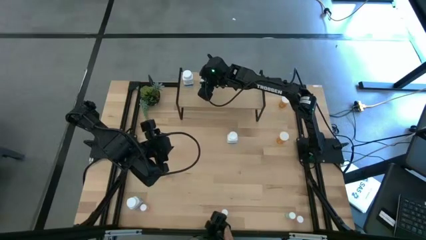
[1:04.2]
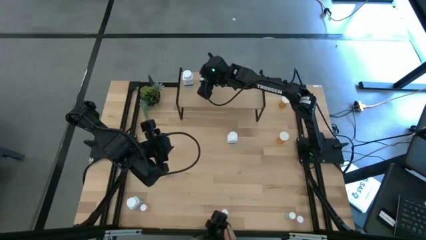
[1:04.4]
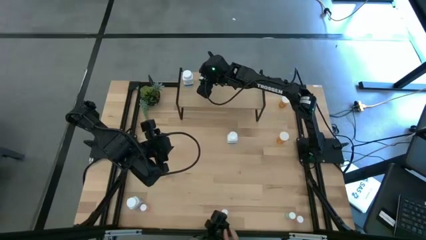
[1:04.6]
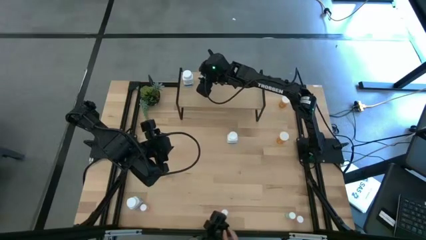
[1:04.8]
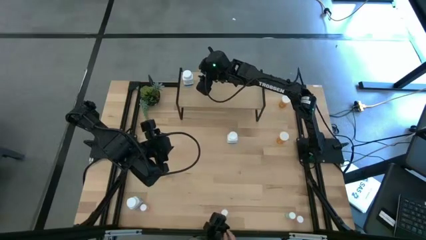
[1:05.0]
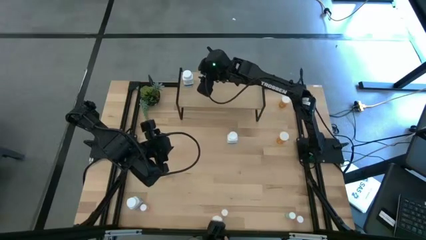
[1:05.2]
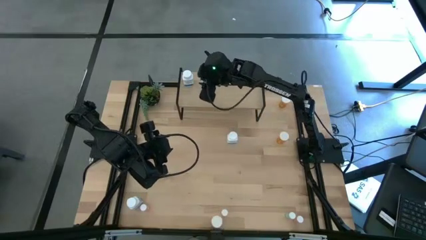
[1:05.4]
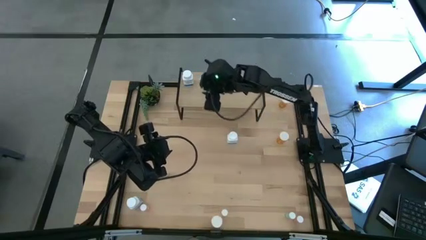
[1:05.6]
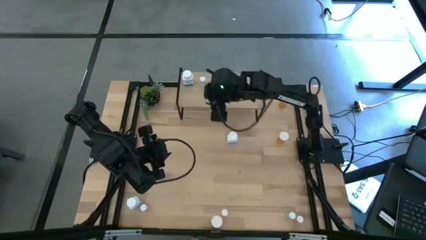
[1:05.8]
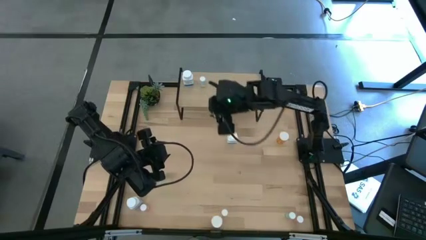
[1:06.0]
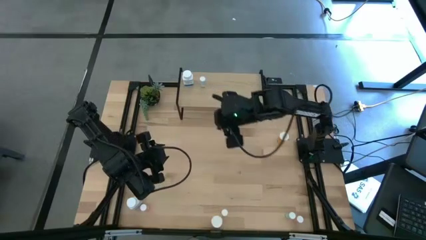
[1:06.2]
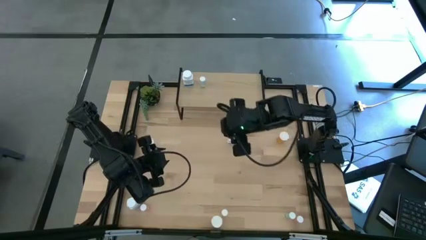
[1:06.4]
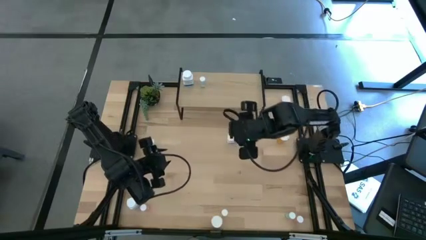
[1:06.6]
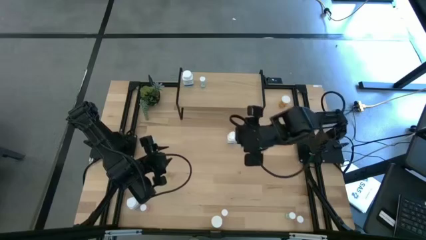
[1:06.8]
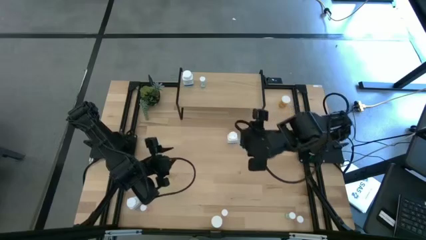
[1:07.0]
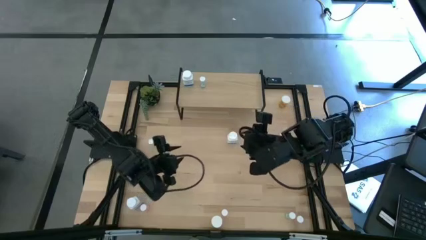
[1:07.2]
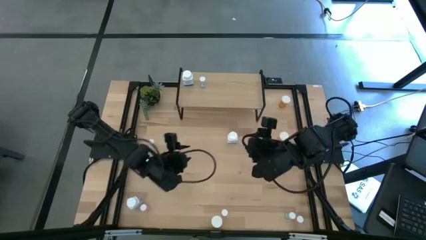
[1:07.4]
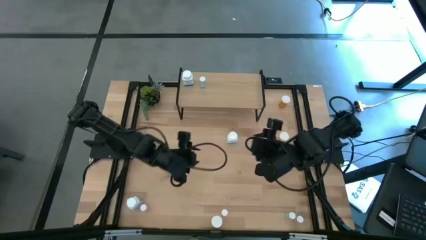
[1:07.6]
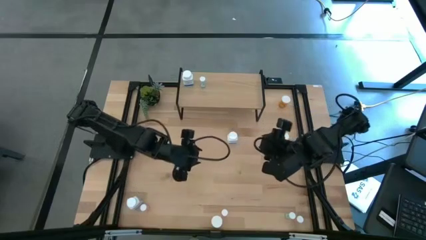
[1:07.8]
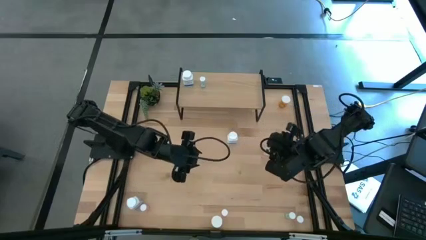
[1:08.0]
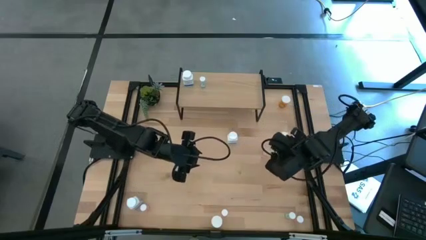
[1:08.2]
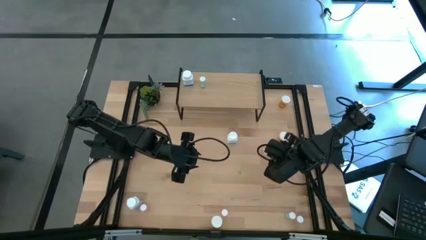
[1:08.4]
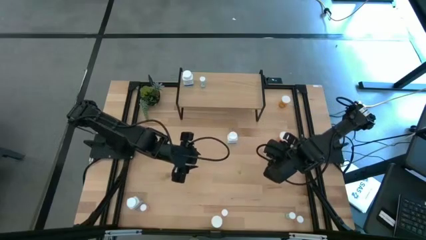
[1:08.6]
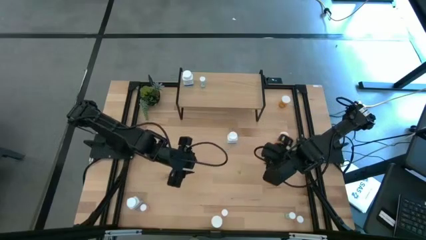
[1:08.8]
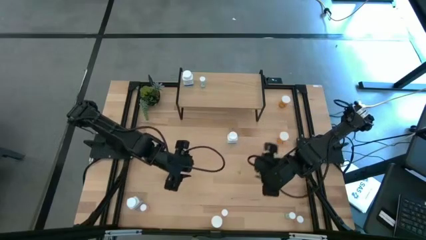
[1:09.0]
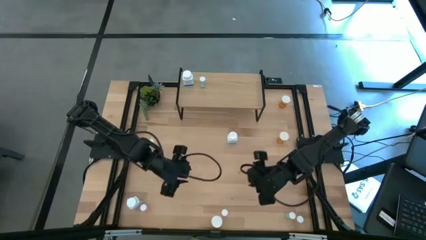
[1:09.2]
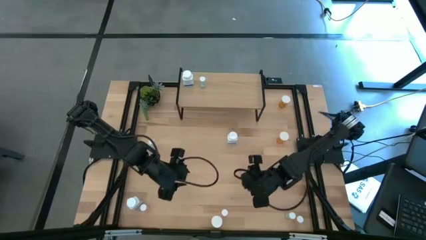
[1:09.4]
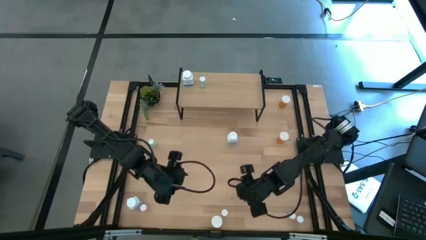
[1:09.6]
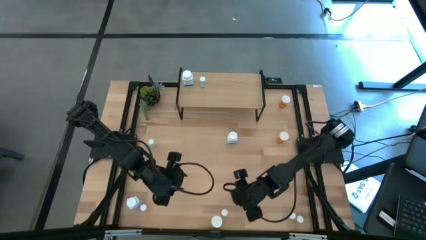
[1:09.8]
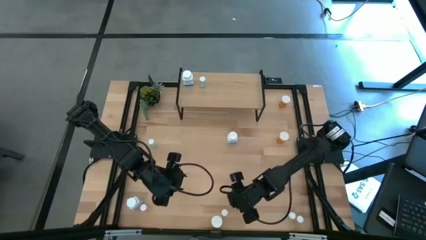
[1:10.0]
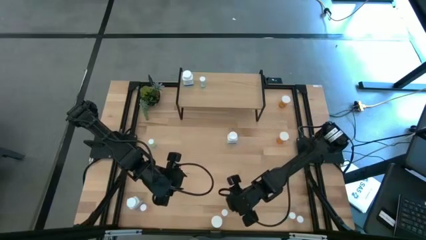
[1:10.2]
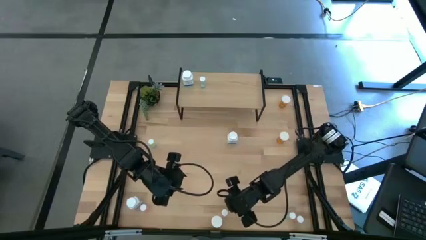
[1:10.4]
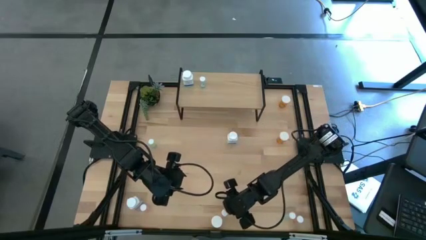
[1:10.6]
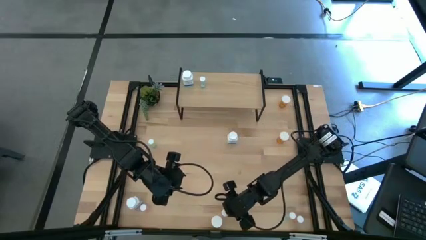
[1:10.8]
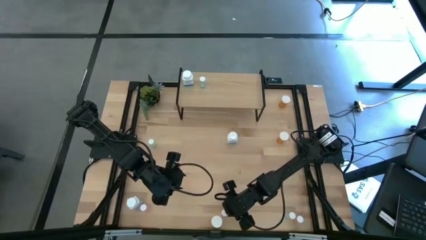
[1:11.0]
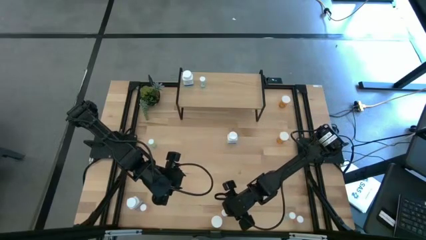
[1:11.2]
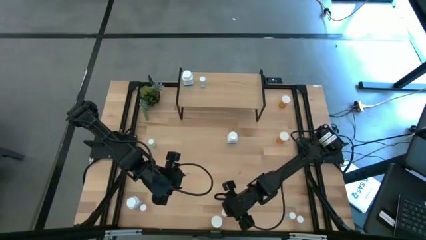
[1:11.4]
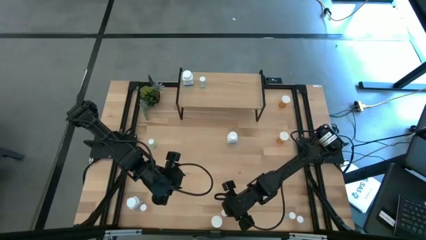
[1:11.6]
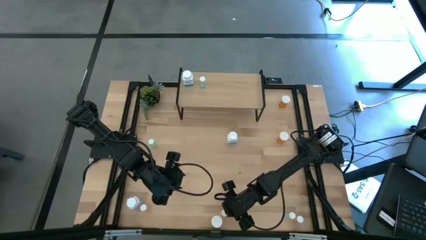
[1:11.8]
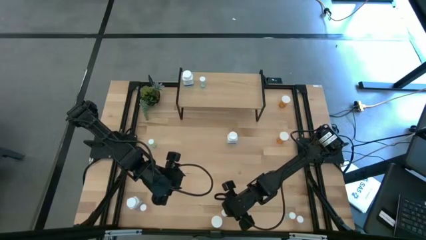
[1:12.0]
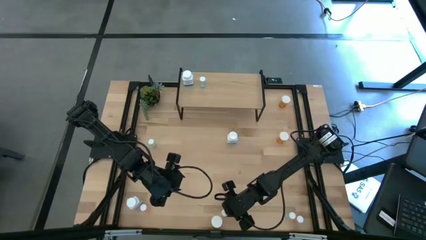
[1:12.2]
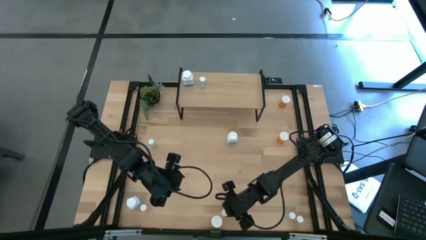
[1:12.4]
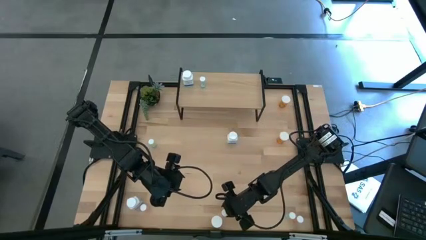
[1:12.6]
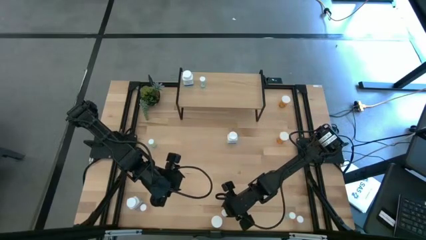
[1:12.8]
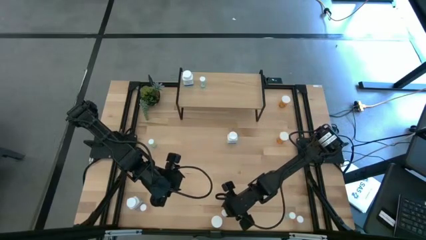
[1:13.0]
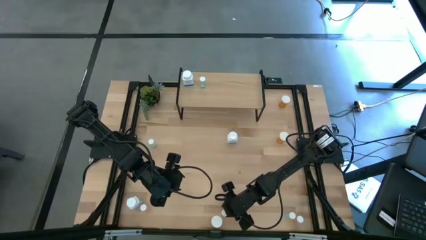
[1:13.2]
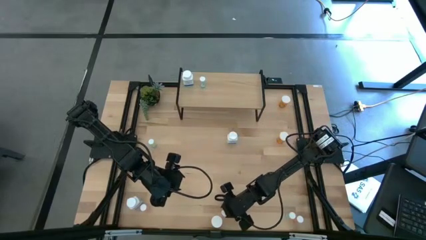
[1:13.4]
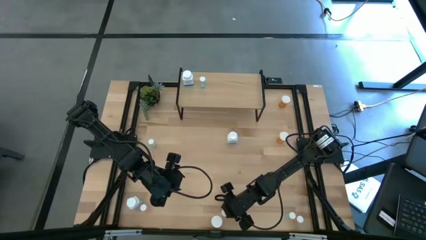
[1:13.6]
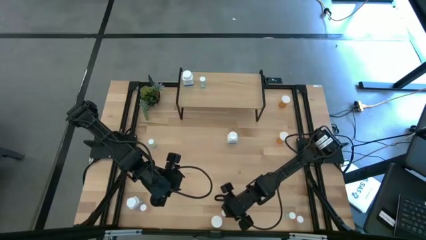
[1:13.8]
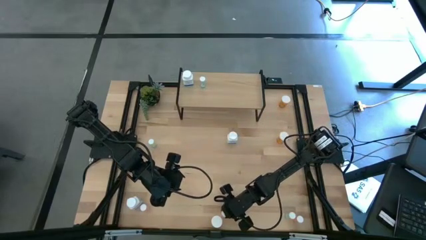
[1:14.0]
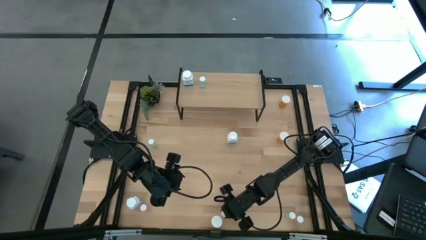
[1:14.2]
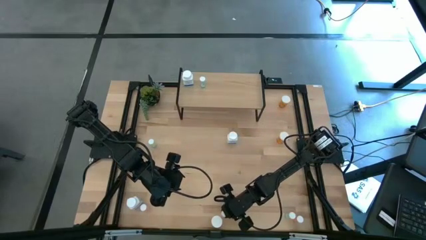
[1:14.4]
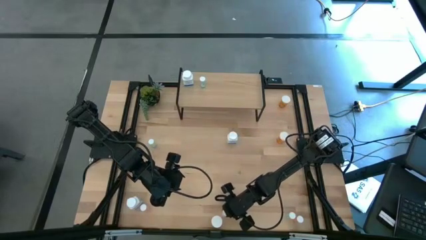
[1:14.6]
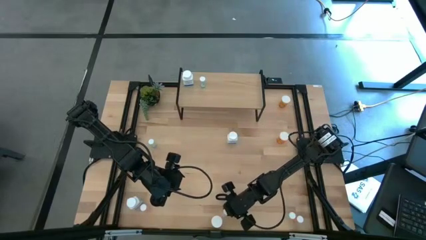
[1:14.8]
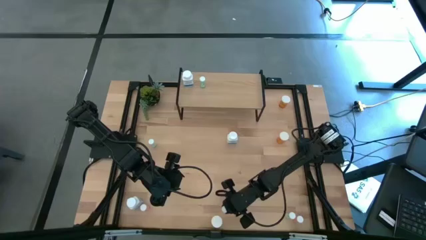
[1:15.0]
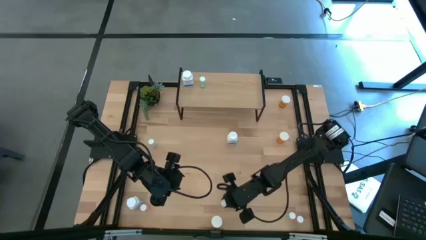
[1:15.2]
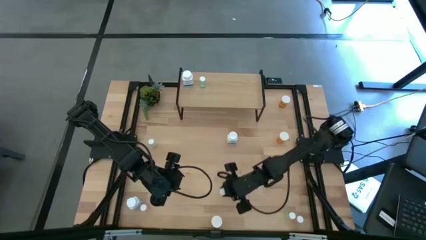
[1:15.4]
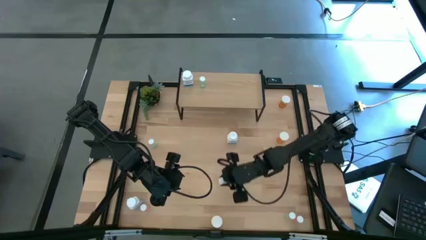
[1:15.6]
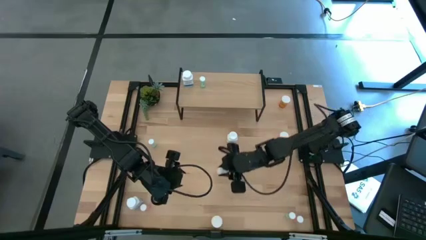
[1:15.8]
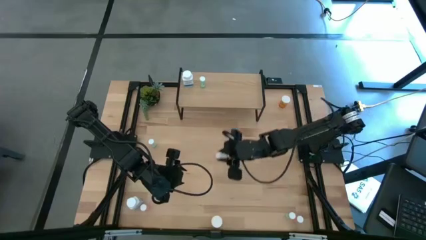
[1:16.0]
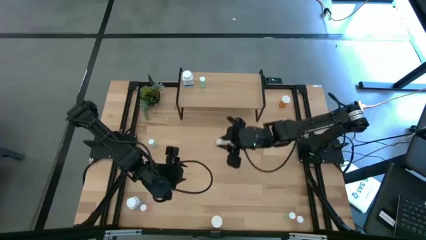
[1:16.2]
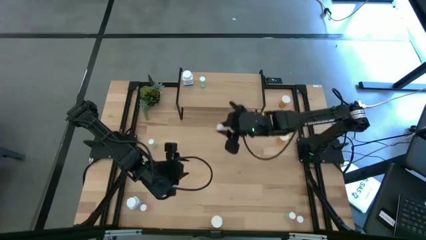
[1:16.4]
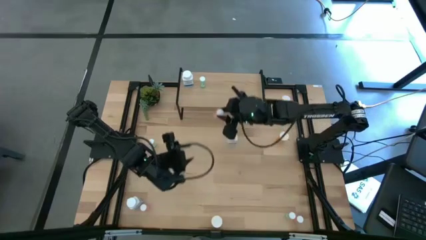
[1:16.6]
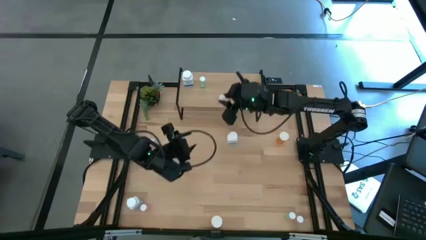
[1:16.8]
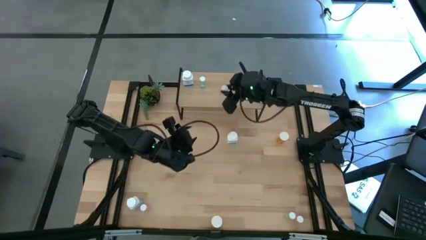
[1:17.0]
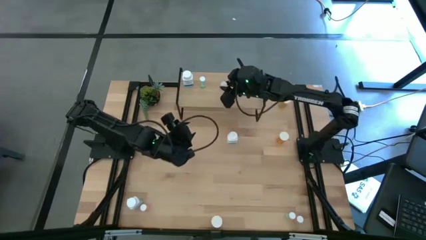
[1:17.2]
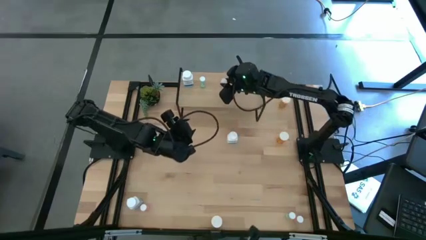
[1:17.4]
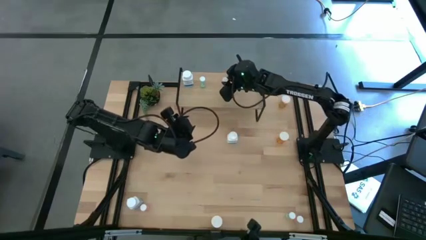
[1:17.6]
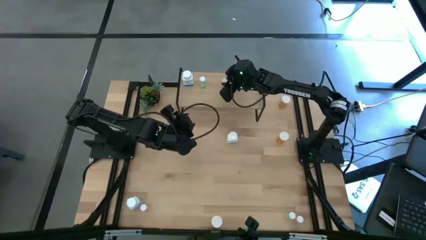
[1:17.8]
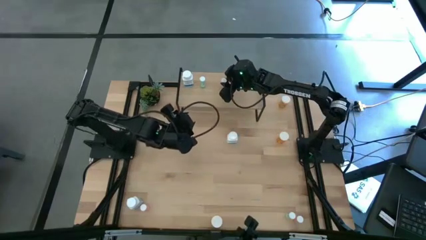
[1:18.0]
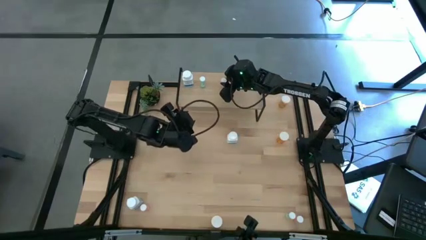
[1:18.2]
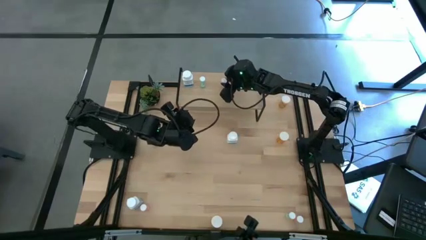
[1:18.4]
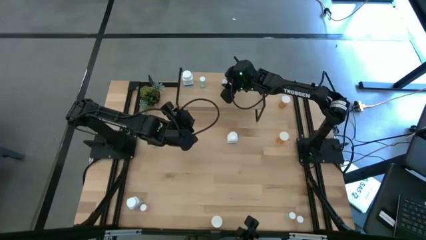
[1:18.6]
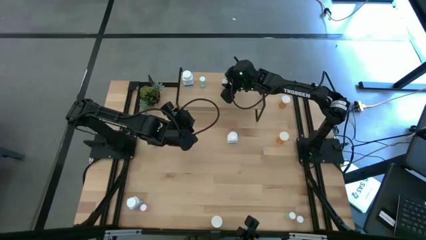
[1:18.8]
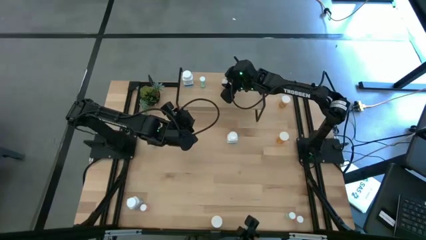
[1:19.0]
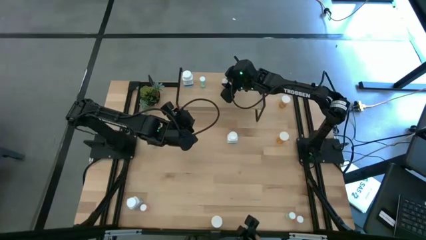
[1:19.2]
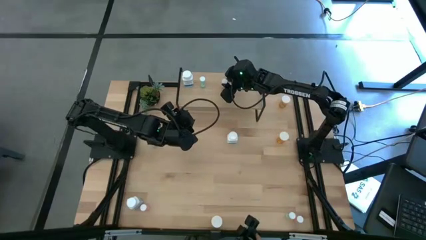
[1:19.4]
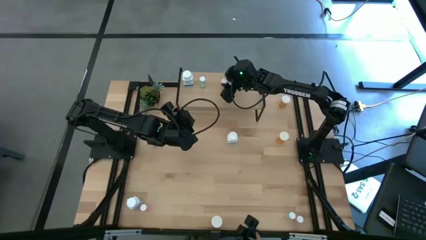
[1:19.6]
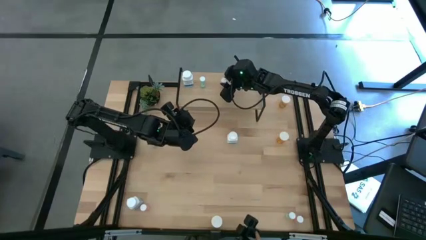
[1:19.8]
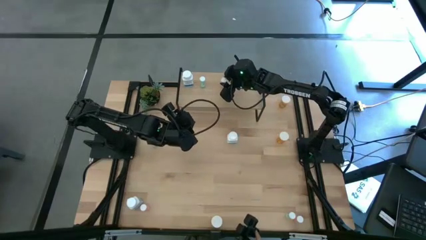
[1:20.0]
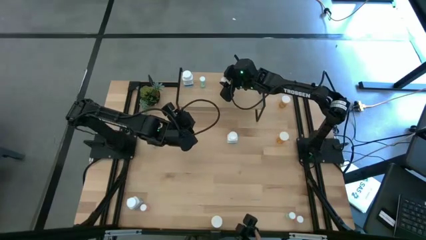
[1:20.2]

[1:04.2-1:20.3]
Task: Pick and place medicine bottles onto shelf by color
Put the middle pink pill bottle on the shelf
